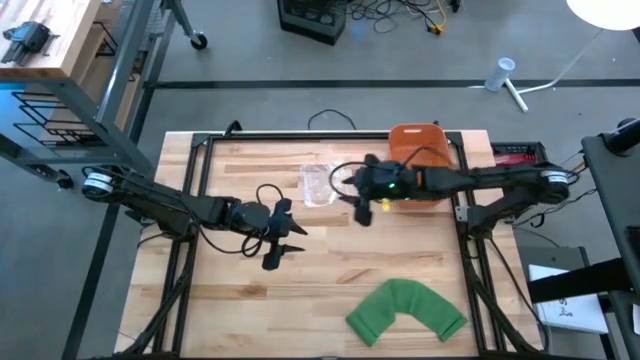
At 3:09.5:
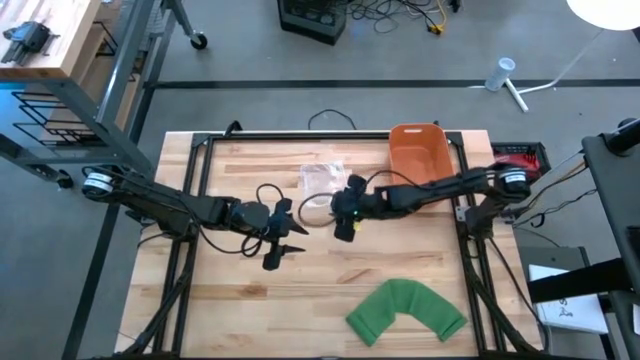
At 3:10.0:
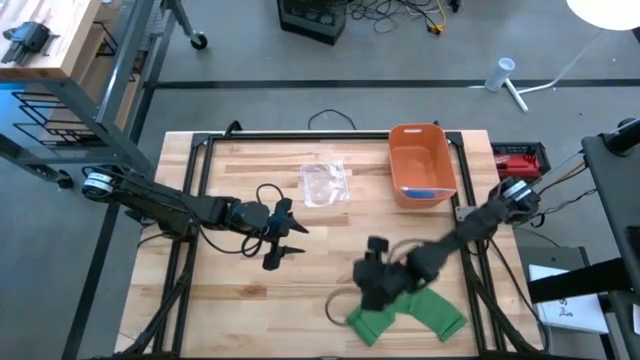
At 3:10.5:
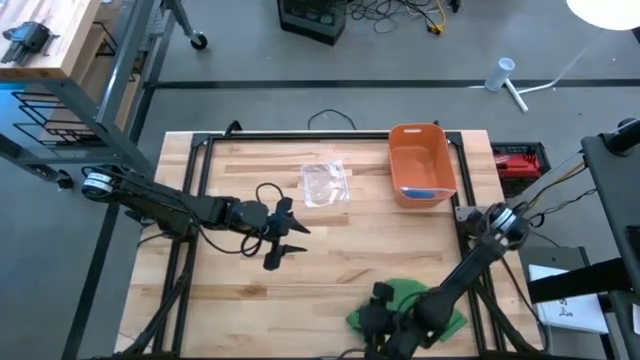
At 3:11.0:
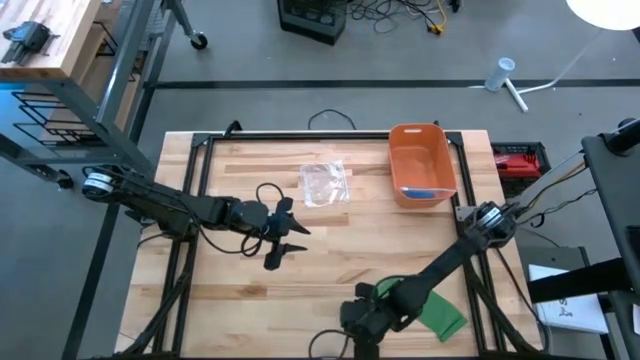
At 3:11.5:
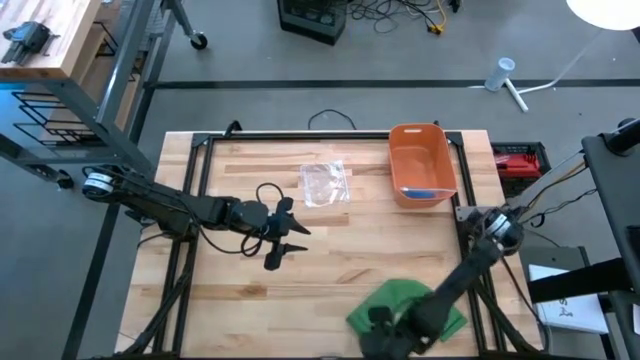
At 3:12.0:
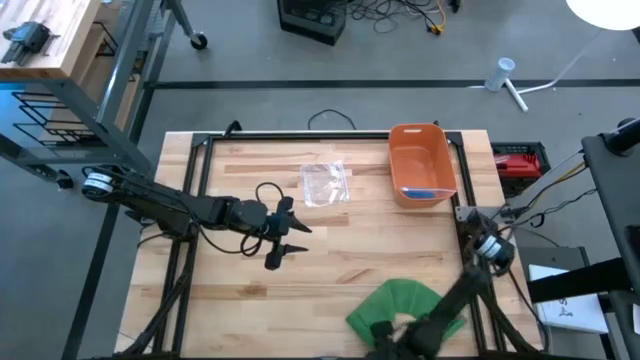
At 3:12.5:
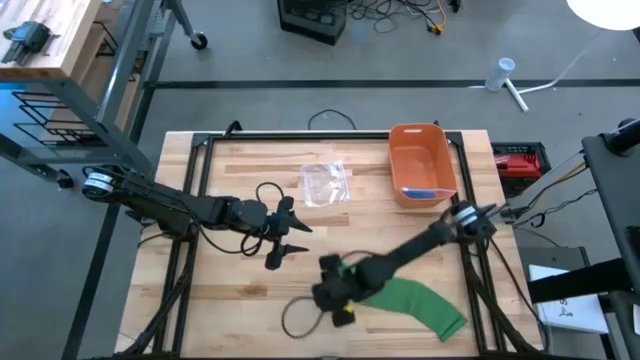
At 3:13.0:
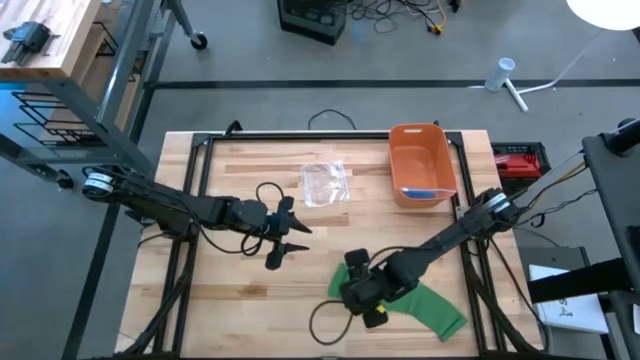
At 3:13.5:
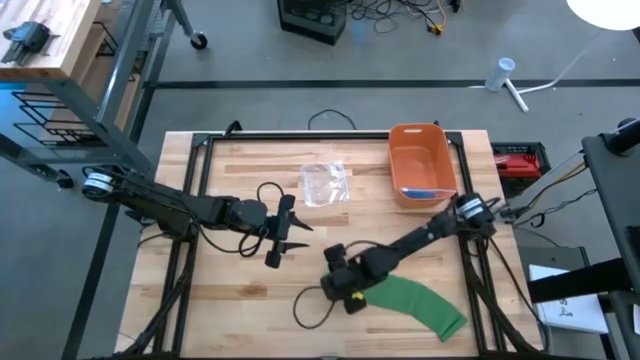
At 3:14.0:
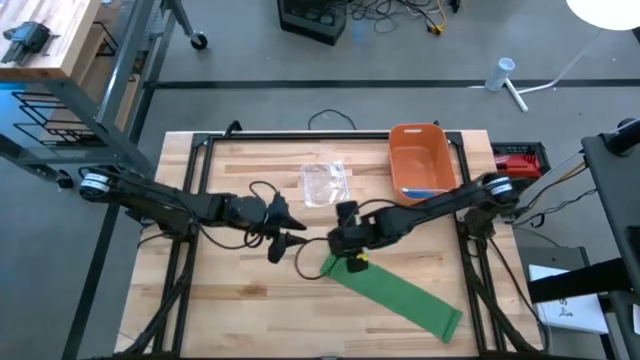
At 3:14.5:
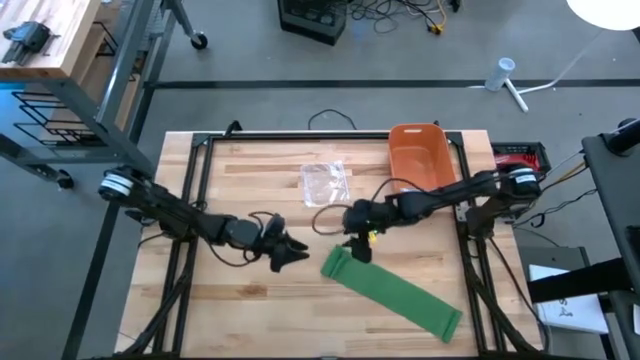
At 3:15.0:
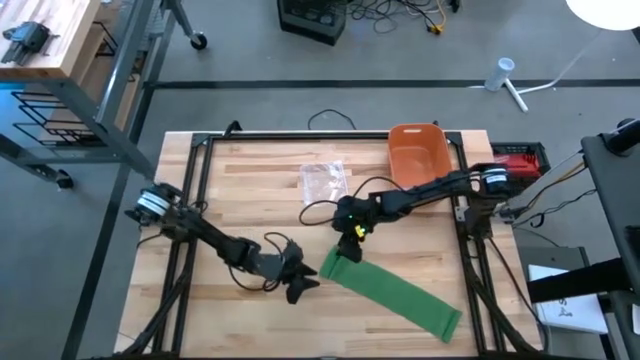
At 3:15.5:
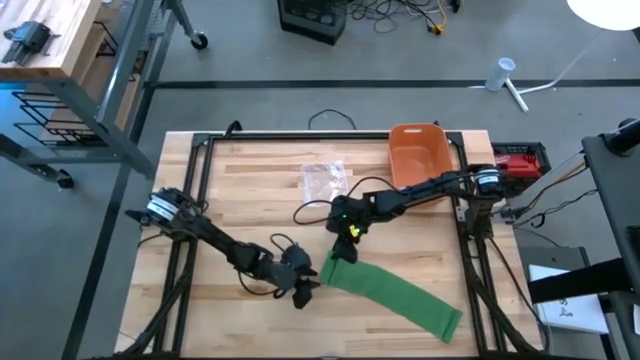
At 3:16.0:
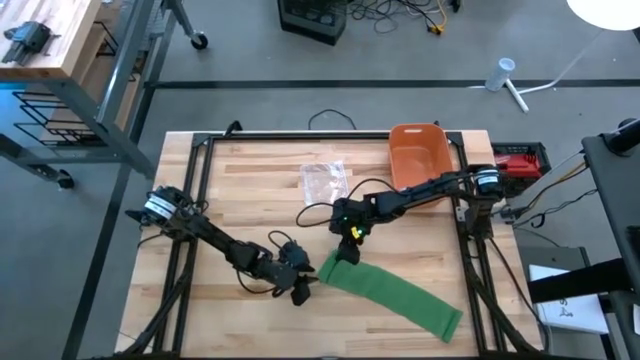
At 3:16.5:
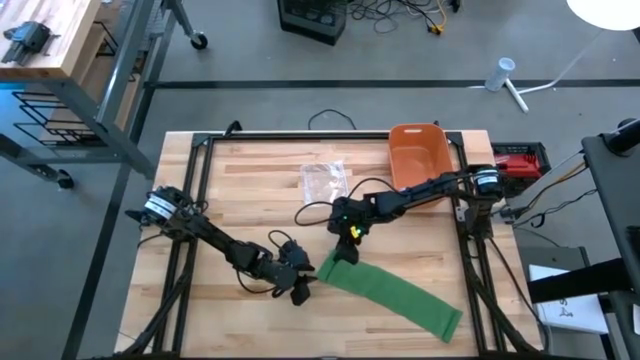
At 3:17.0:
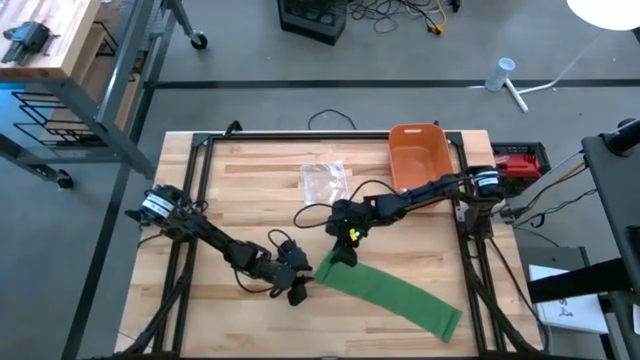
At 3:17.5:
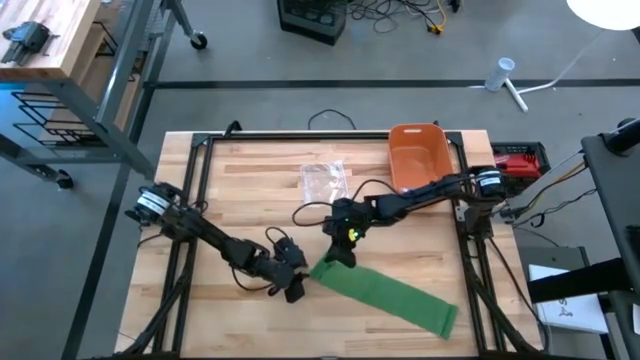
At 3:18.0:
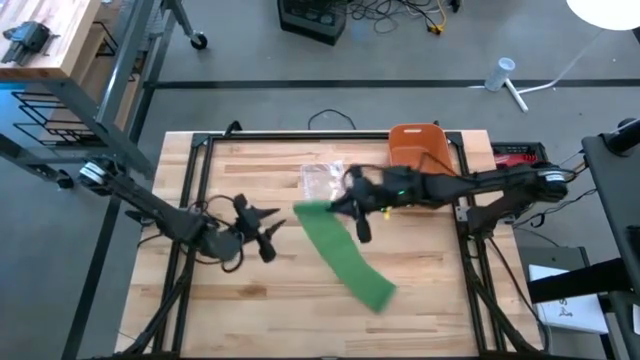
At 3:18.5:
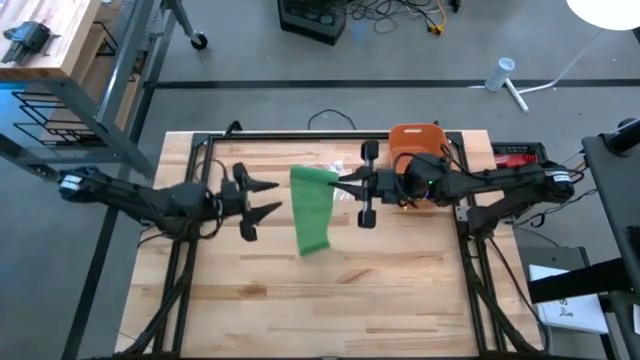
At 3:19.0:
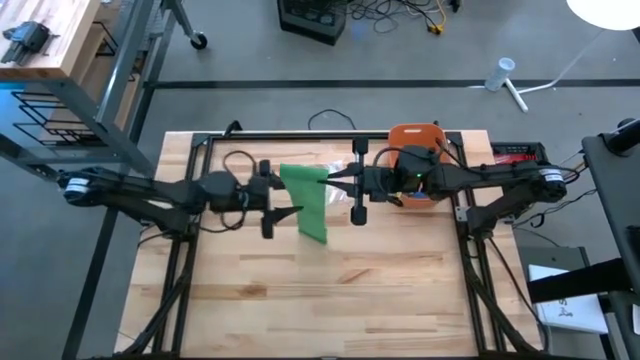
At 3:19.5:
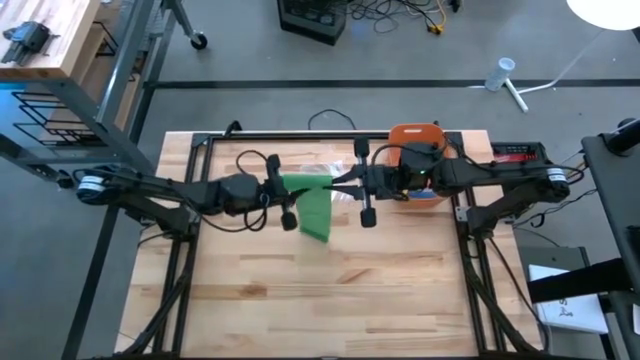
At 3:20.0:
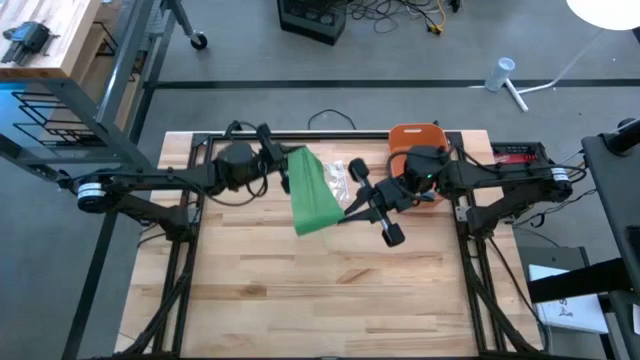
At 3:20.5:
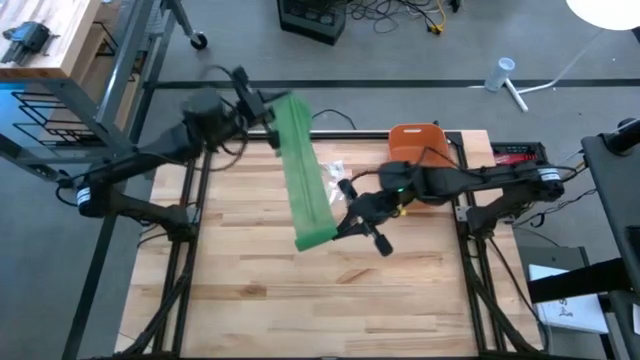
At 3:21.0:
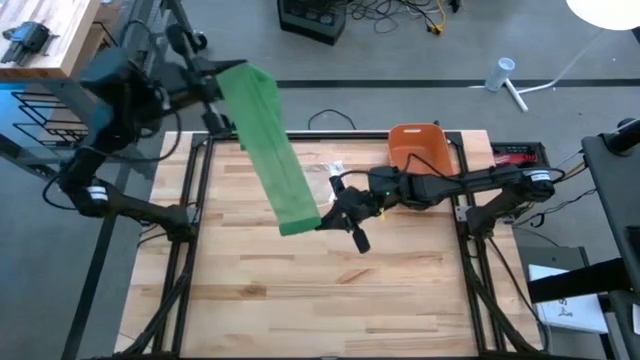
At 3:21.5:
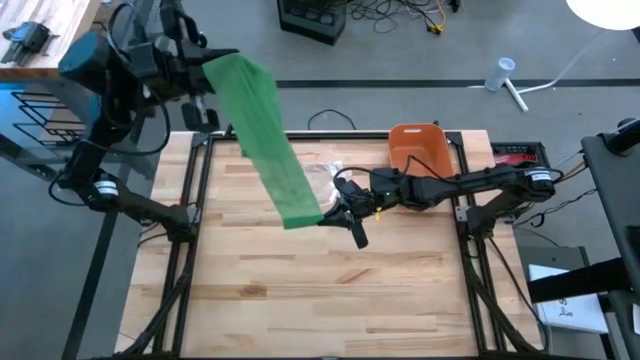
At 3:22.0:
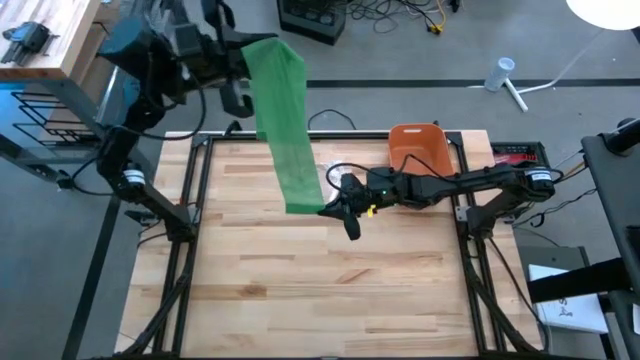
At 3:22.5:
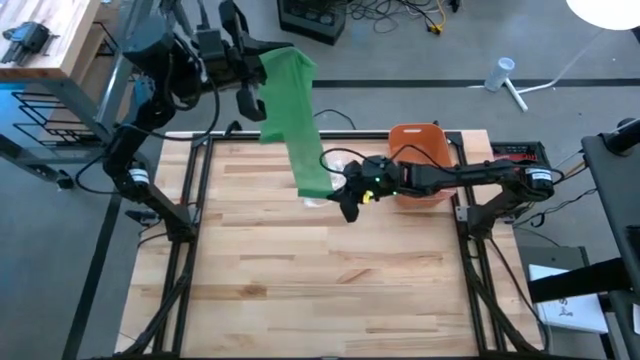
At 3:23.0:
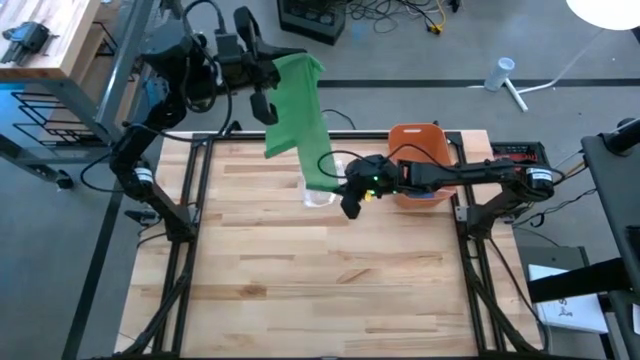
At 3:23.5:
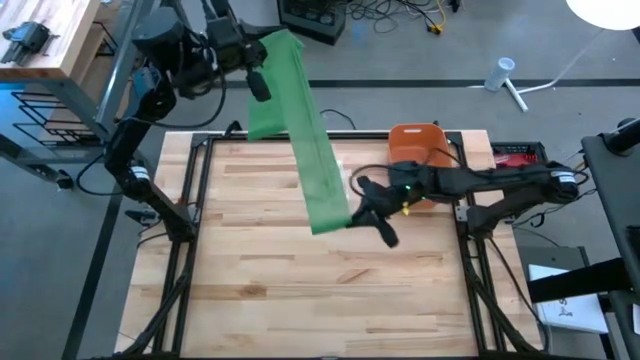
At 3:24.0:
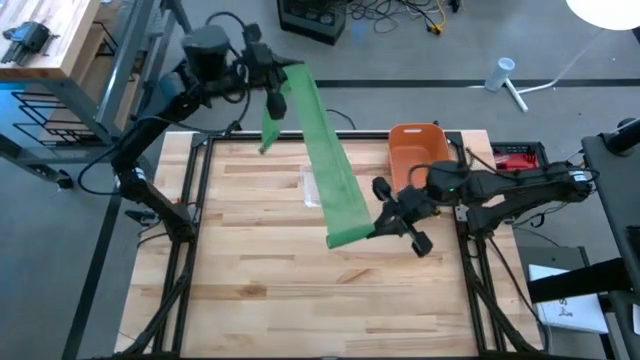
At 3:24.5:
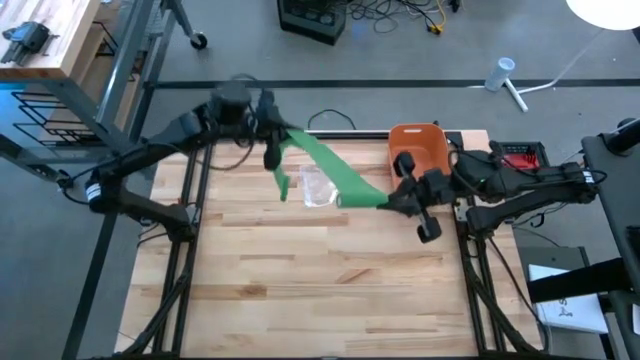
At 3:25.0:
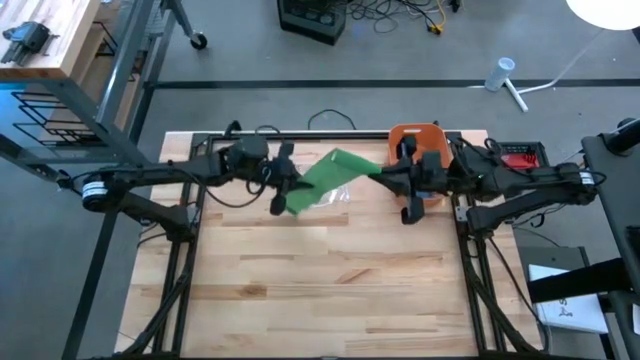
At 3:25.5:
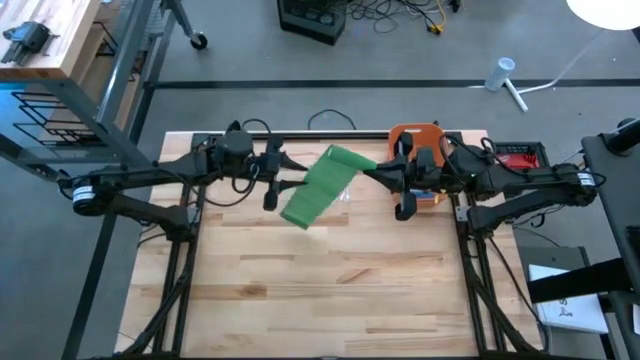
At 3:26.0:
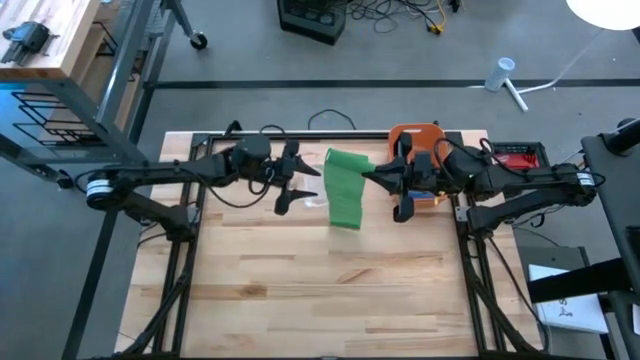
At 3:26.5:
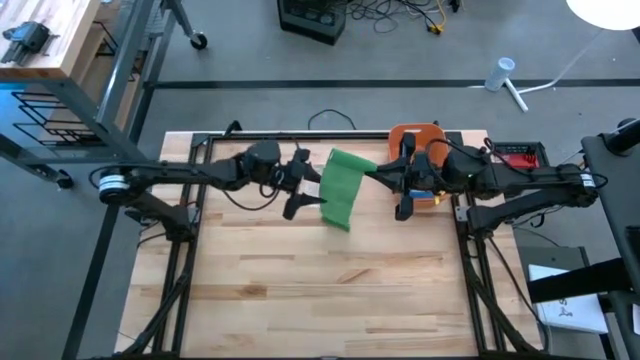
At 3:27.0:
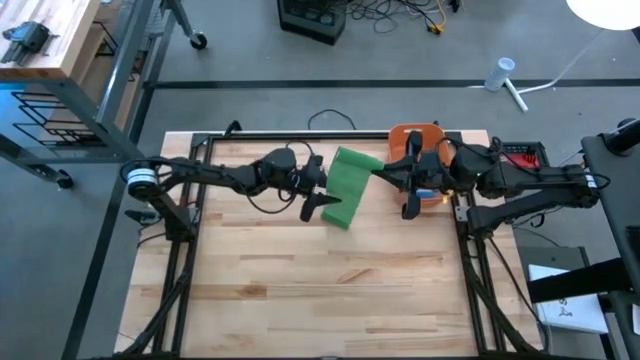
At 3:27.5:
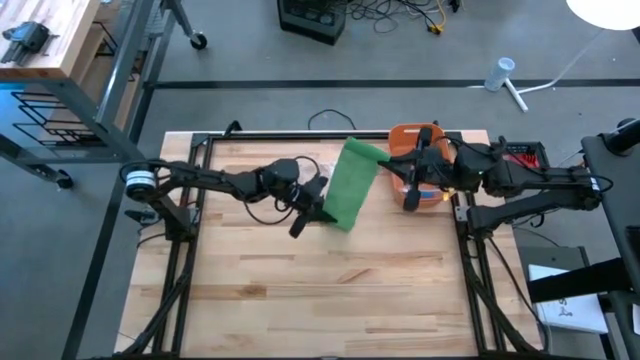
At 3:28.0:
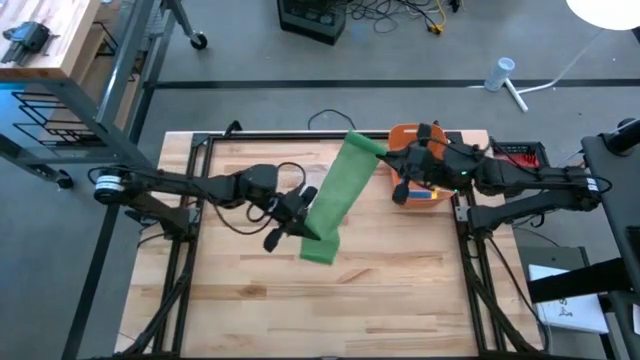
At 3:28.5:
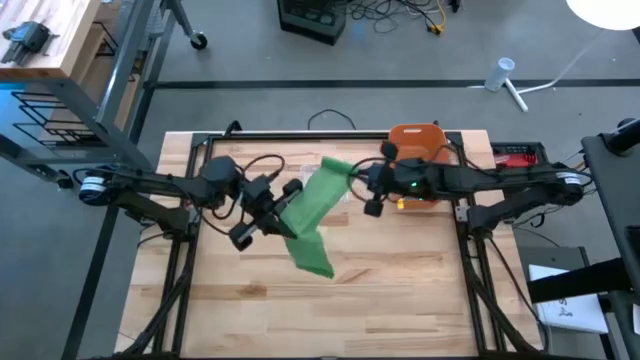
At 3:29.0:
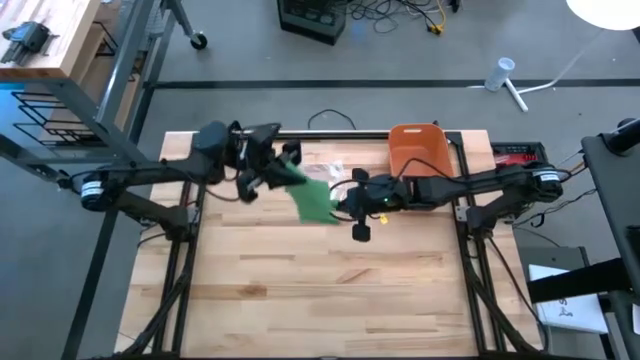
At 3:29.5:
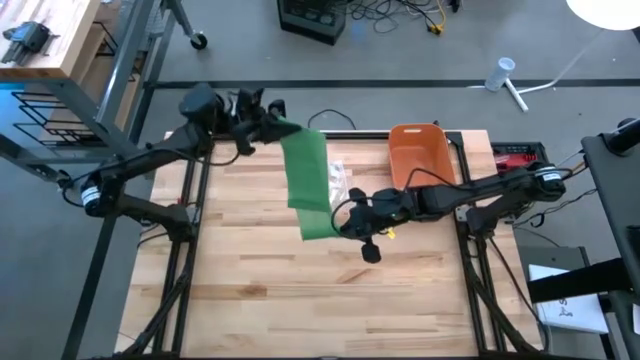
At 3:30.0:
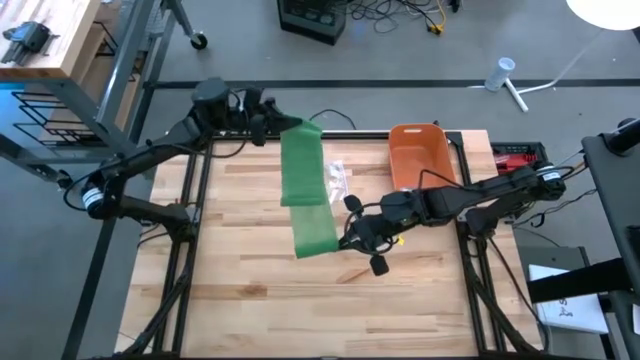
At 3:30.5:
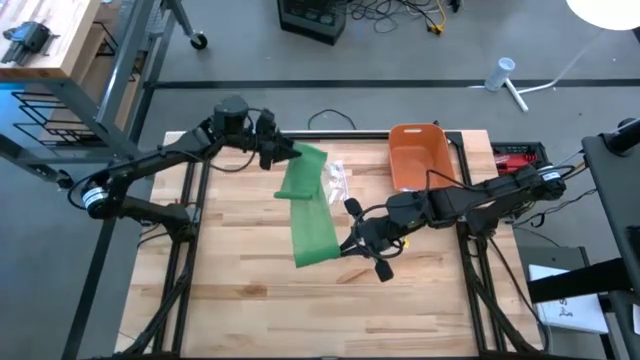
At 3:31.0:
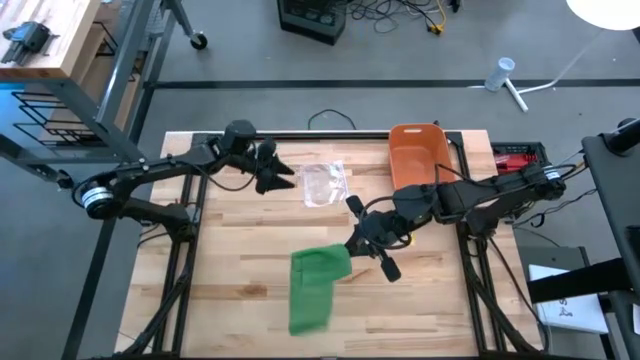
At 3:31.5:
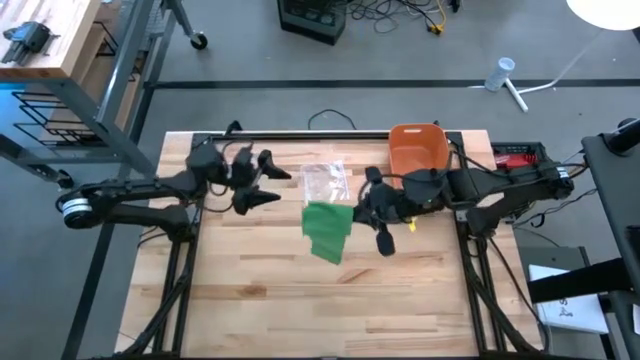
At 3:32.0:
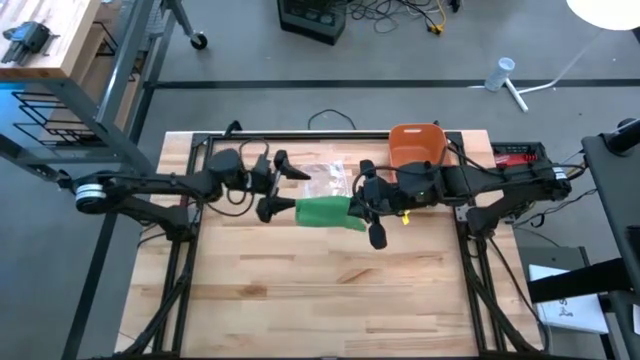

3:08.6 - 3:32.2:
Task: Roll bandage
Roll the green bandage
